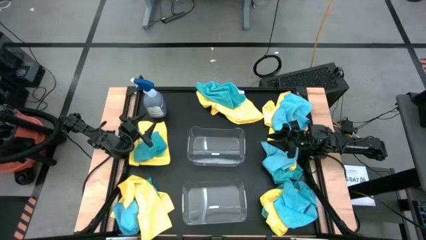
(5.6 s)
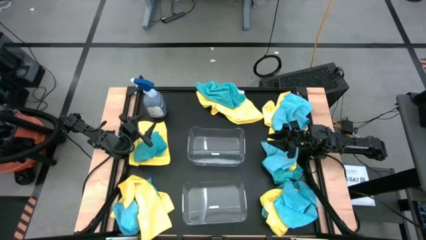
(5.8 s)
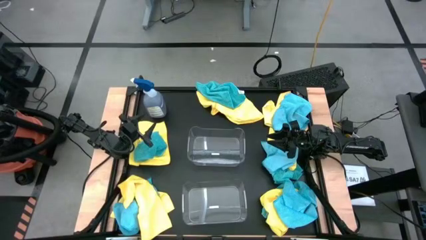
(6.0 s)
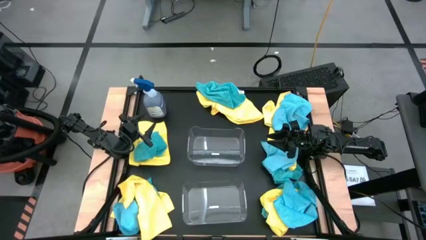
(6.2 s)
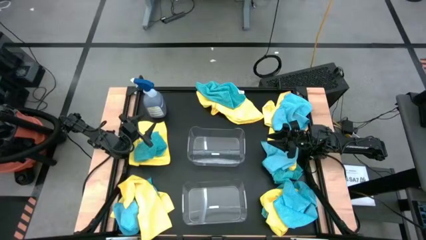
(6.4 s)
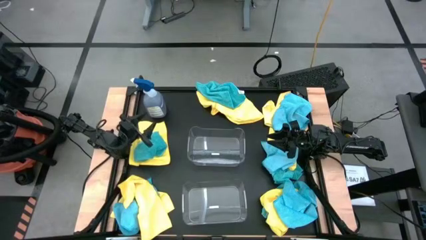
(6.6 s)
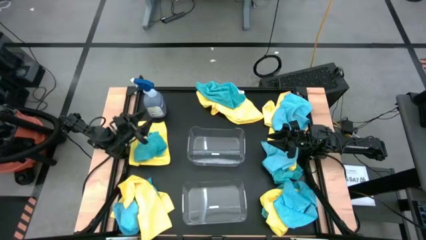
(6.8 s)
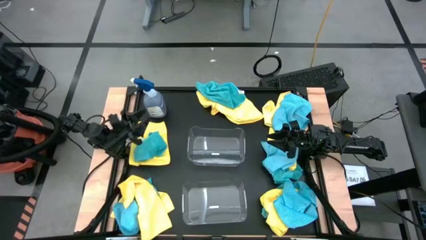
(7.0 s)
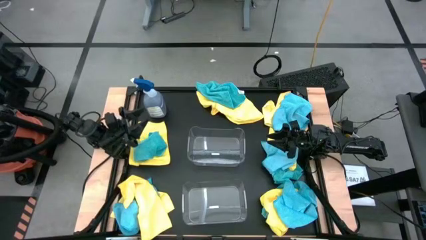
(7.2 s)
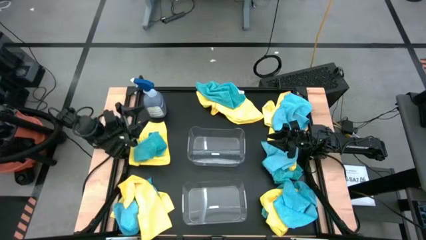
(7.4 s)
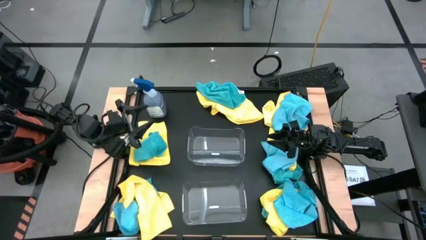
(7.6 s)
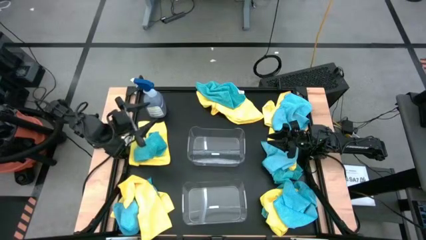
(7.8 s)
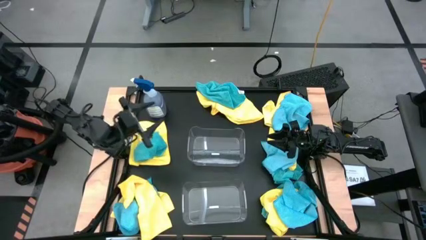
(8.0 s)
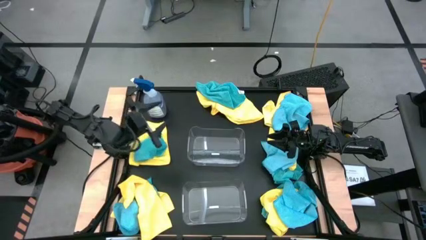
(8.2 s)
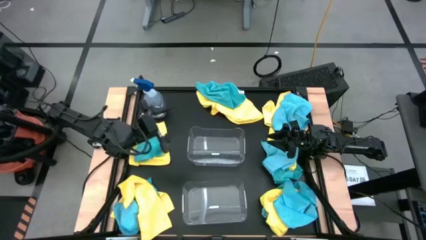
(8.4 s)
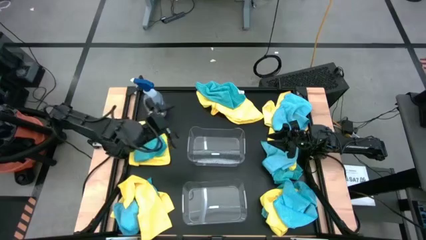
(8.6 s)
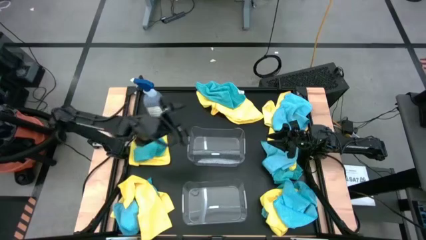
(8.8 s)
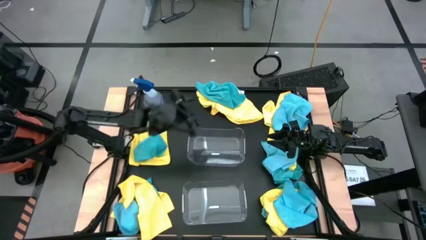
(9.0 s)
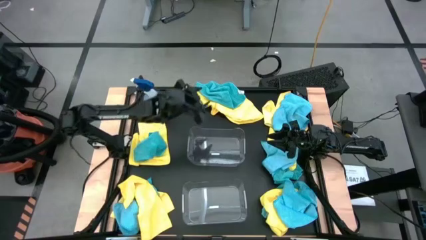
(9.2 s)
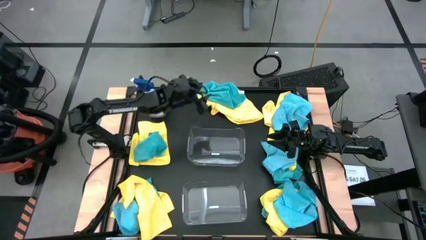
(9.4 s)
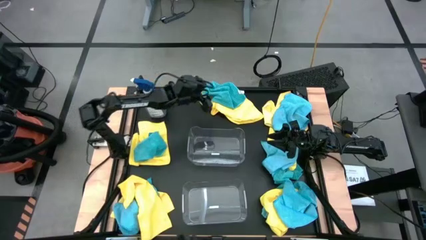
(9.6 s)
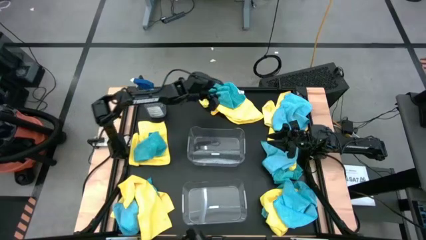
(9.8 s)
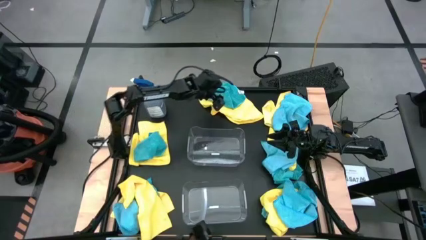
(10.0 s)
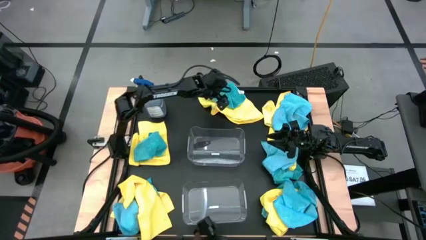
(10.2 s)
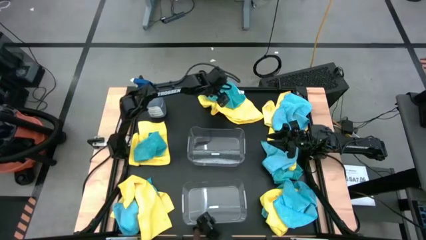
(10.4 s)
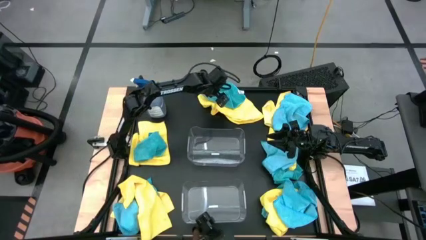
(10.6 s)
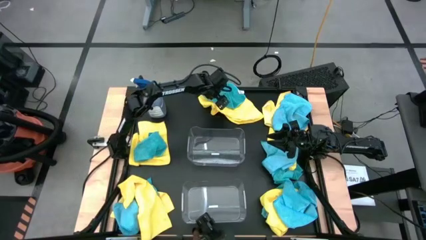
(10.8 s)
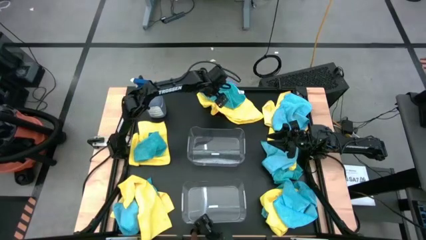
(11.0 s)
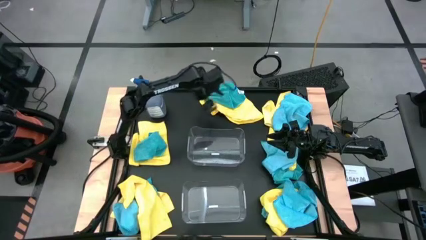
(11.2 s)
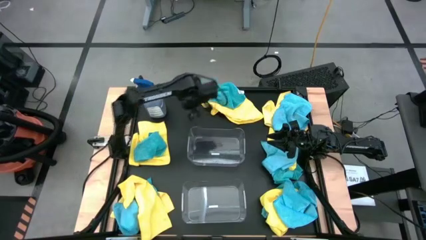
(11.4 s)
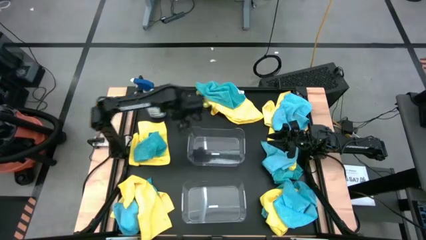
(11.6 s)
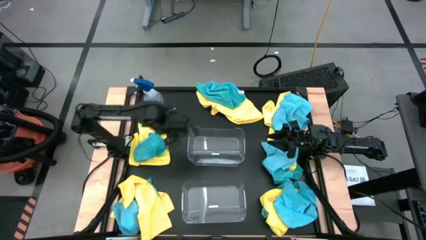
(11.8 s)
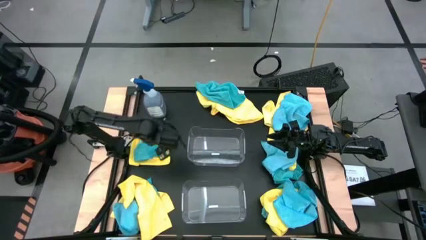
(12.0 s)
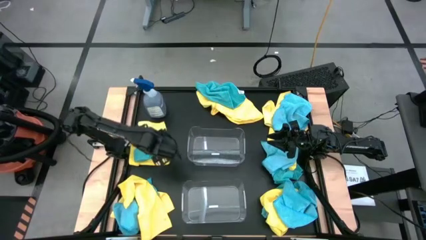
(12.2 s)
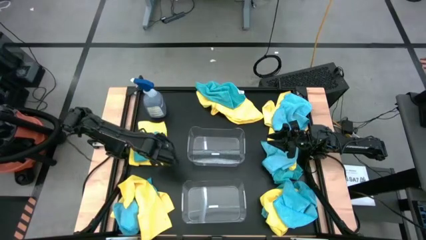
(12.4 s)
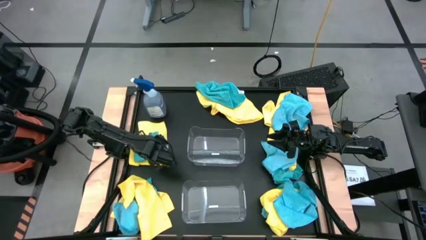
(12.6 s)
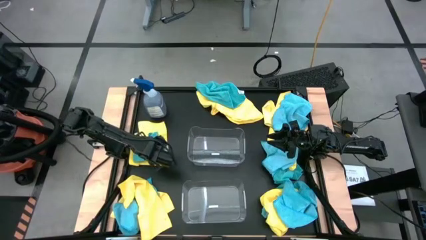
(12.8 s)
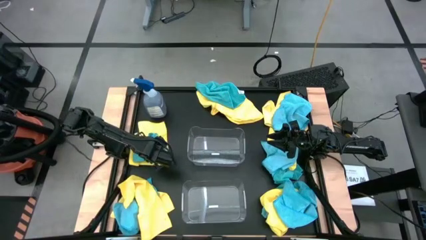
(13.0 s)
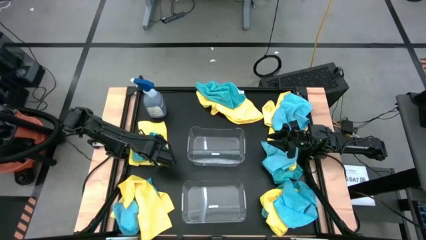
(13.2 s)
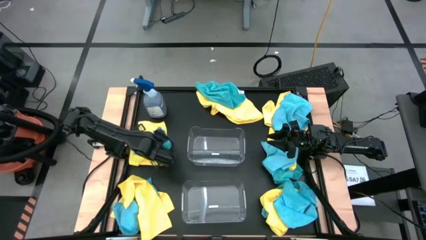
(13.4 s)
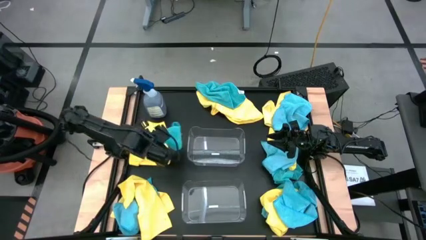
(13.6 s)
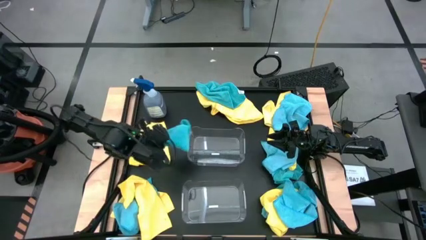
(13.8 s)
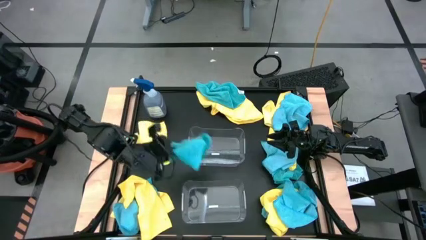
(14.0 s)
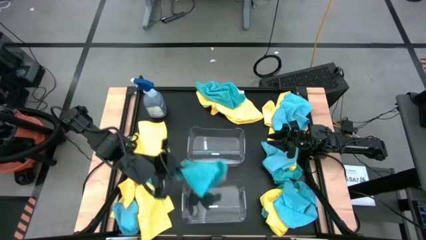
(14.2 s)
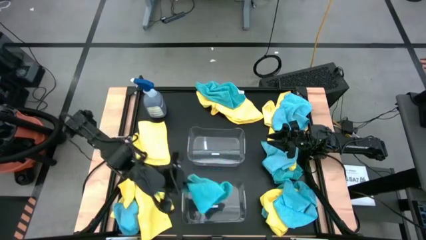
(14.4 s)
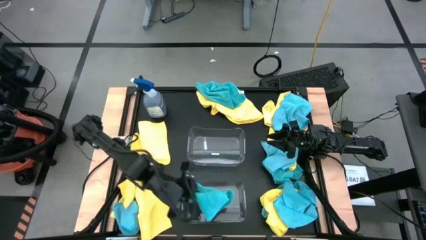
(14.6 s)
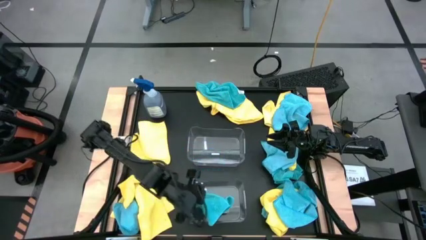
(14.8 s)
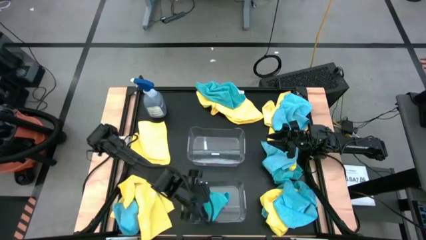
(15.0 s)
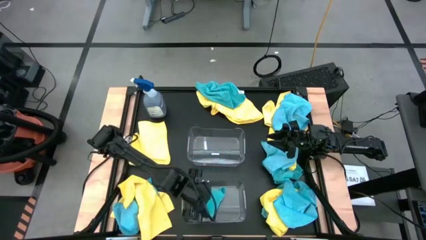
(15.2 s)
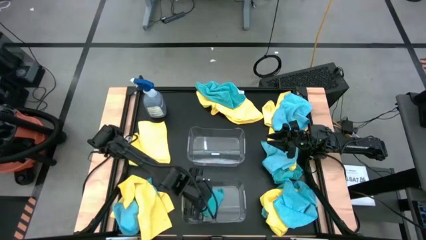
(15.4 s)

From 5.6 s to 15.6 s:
Task: Sort microfiber towel by color & place in baskets
Put the blue microfiber cloth into the bottom transparent bin

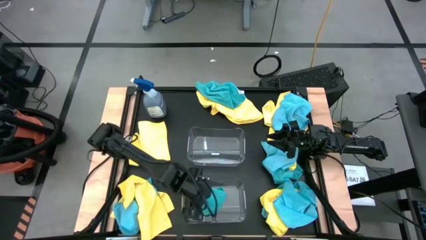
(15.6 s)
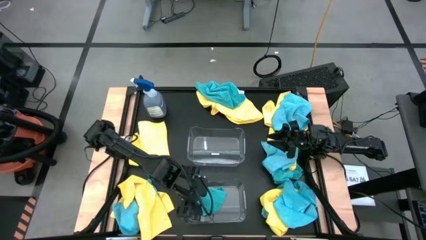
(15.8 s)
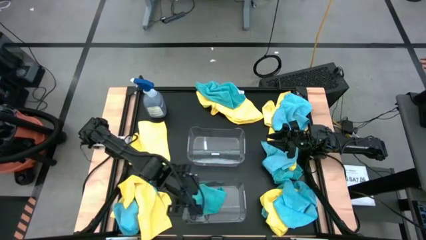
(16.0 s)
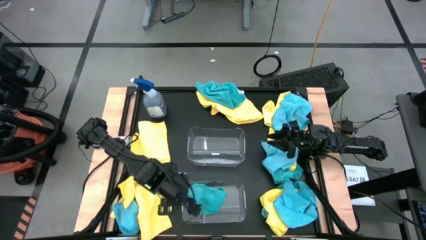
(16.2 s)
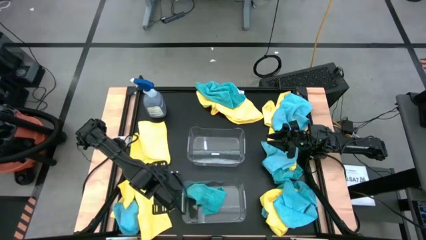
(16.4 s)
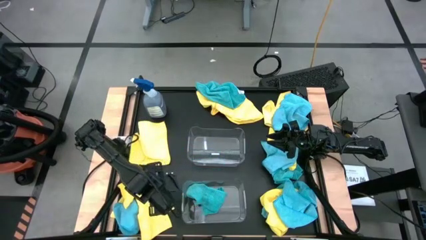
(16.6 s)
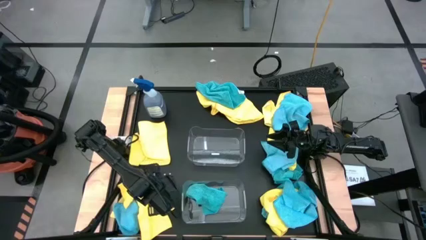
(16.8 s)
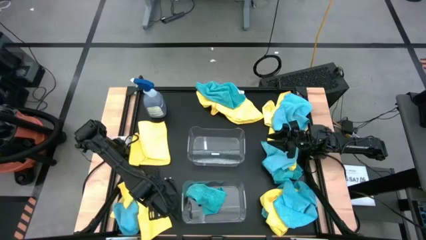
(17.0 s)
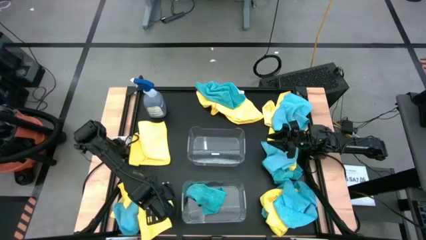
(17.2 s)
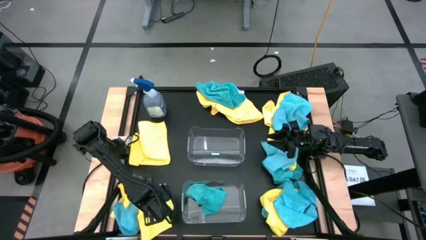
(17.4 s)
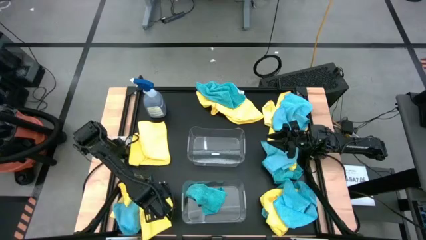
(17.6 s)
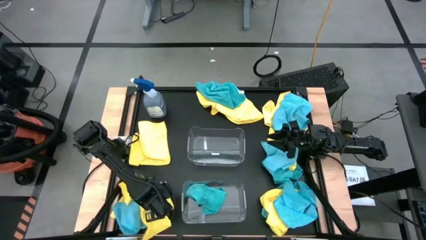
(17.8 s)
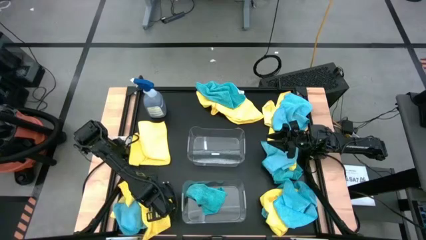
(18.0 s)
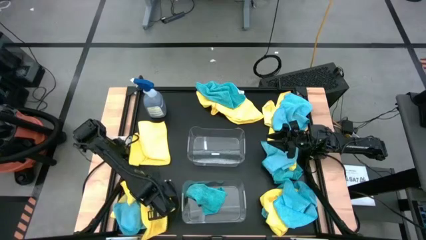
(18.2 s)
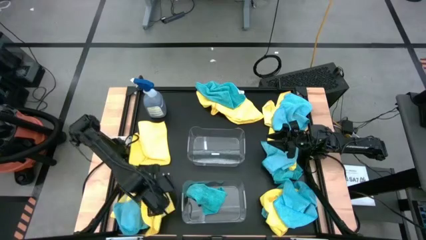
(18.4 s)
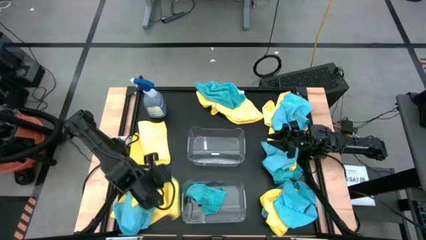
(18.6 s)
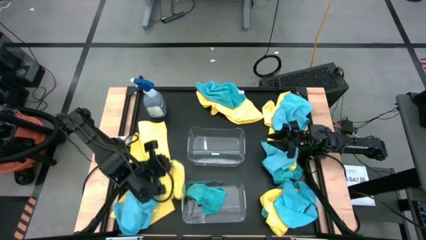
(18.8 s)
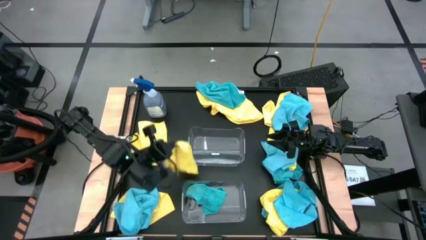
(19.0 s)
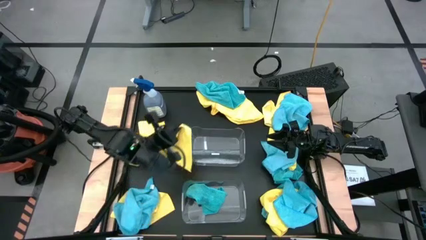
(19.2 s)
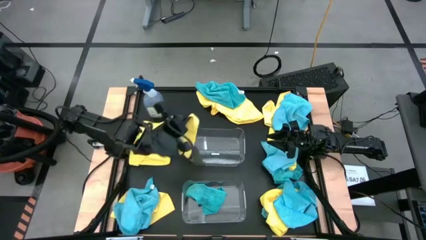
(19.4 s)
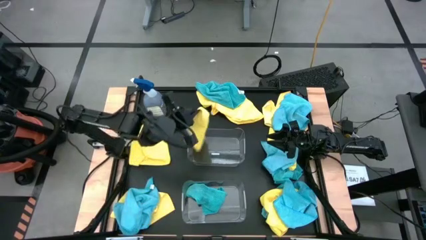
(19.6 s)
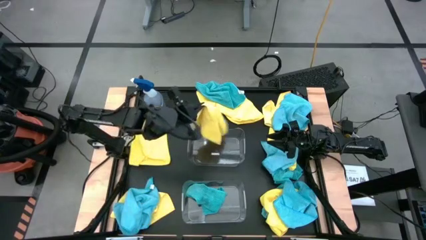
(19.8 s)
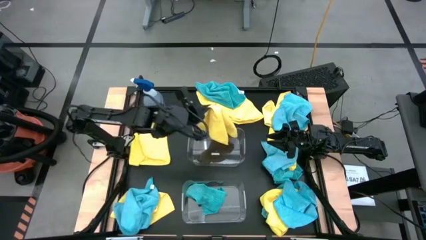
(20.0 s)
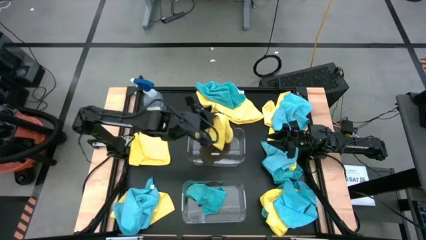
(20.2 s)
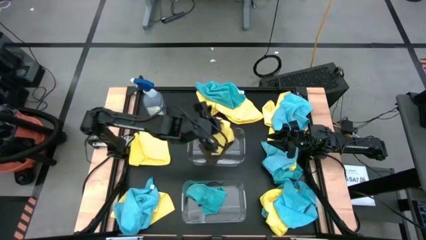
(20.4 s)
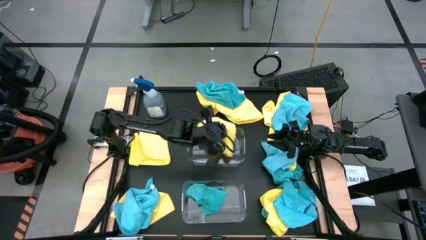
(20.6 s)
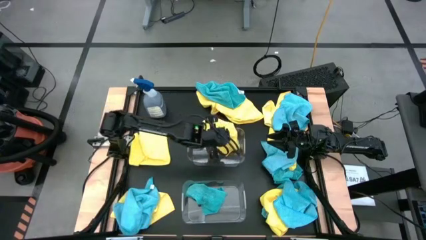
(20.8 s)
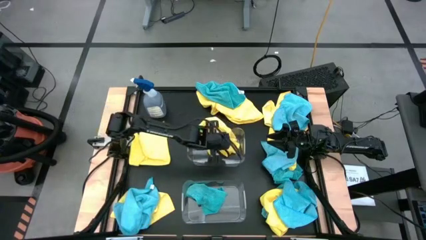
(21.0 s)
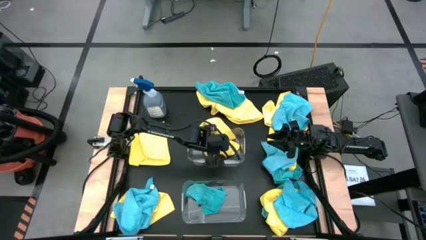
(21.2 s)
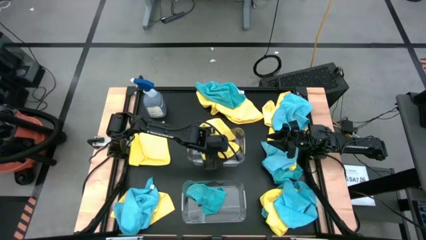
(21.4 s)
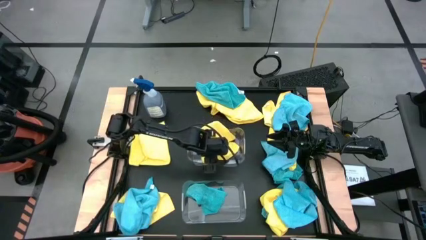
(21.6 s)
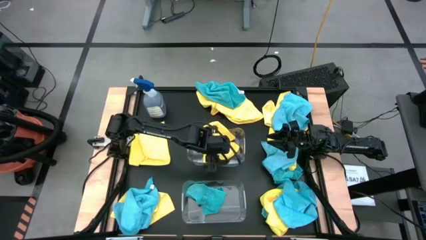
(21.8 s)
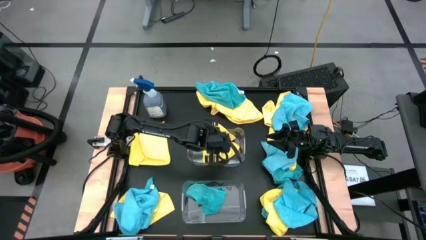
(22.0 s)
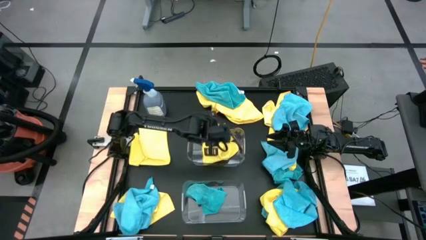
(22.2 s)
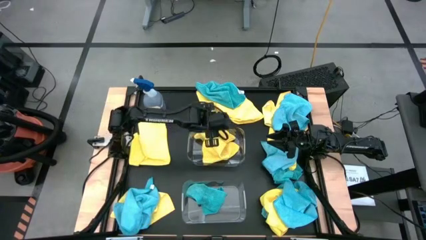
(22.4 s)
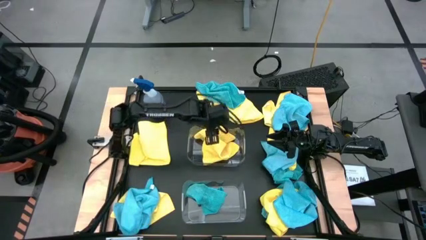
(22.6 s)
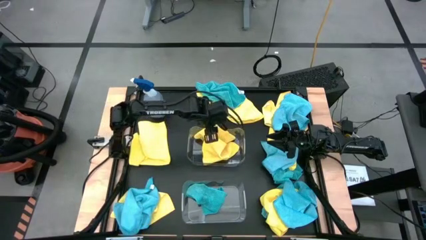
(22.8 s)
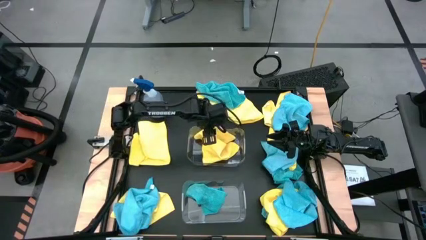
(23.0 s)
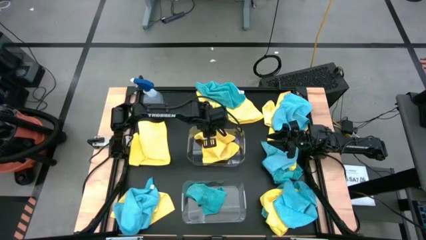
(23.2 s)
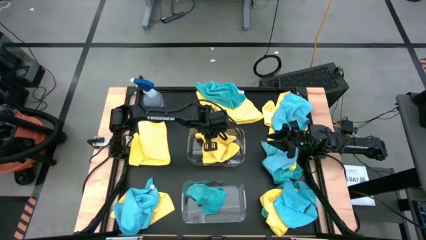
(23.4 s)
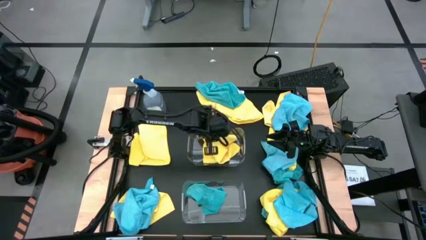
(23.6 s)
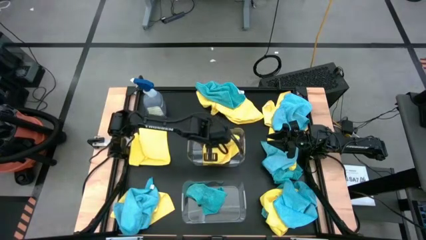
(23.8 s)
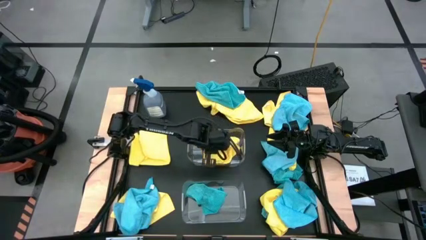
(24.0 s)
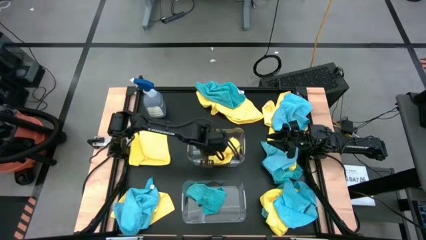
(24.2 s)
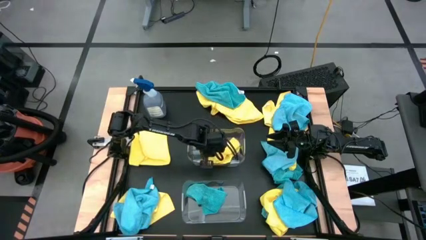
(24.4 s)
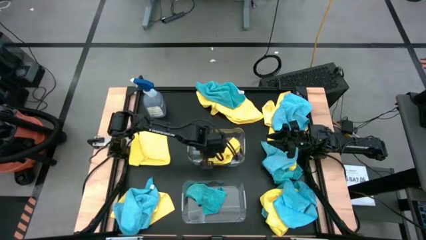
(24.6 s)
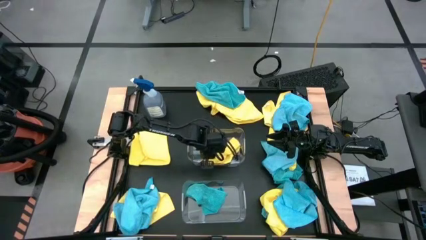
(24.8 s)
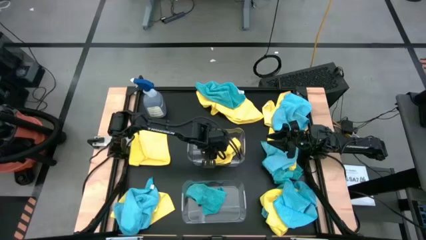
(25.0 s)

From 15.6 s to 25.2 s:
Put the yellow microfiber cloth into the top transparent bin
